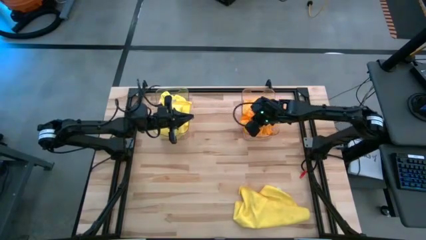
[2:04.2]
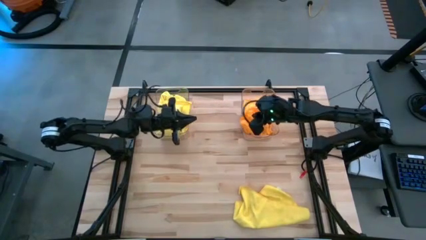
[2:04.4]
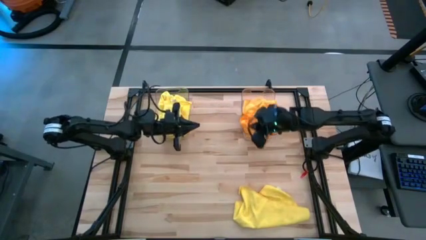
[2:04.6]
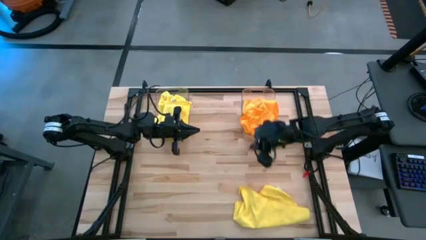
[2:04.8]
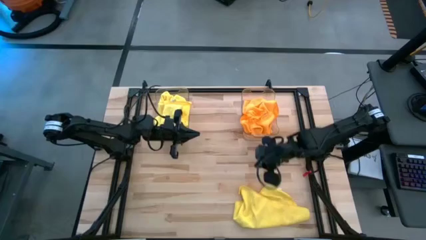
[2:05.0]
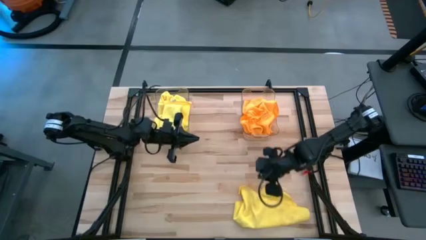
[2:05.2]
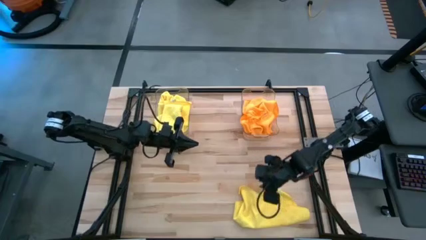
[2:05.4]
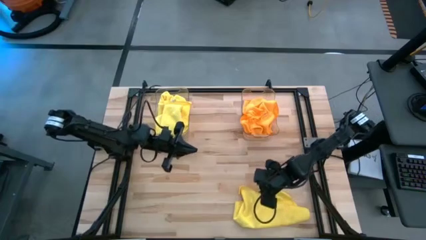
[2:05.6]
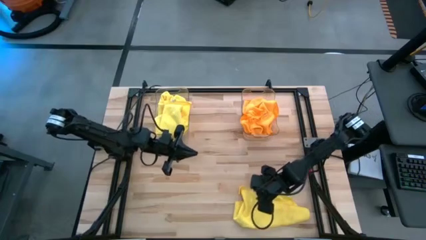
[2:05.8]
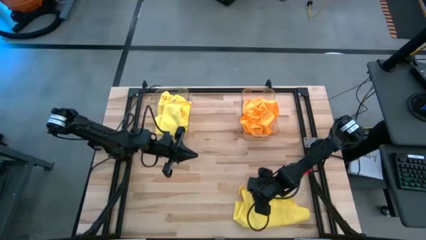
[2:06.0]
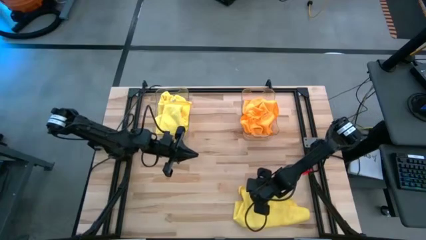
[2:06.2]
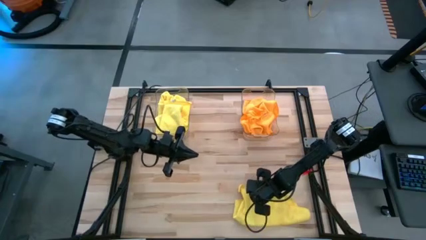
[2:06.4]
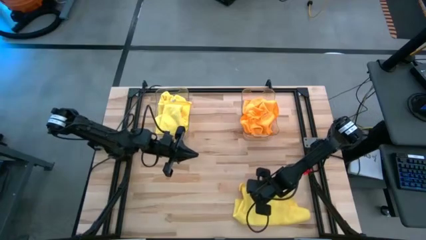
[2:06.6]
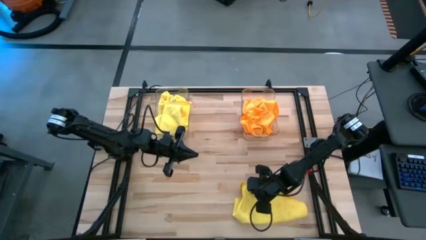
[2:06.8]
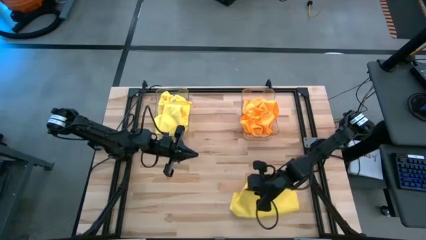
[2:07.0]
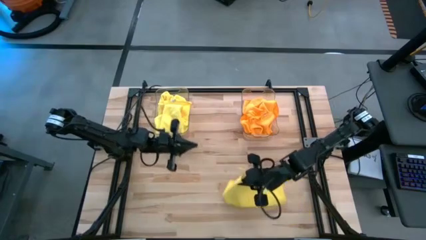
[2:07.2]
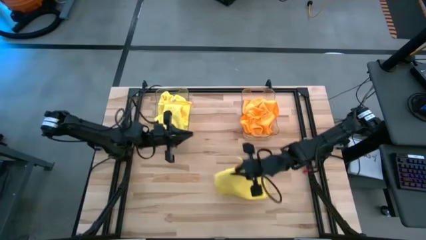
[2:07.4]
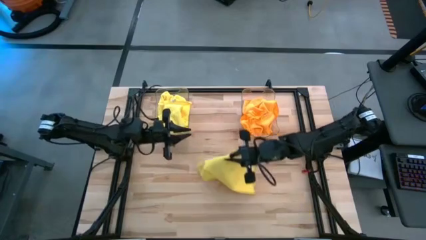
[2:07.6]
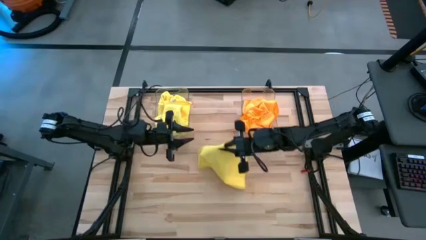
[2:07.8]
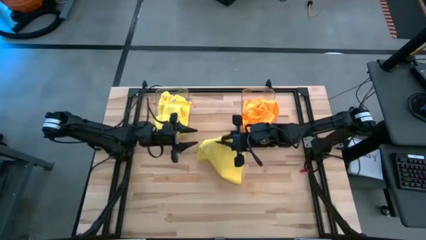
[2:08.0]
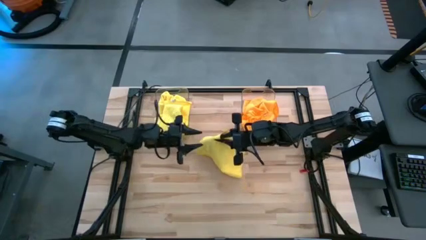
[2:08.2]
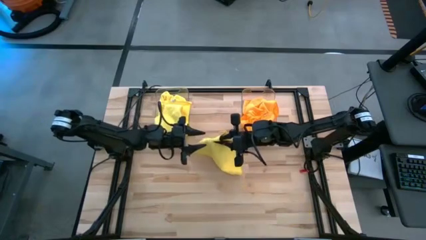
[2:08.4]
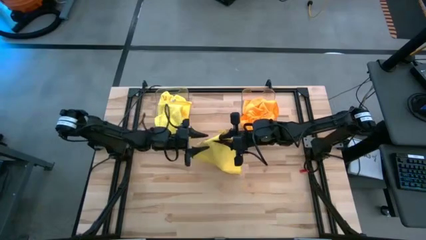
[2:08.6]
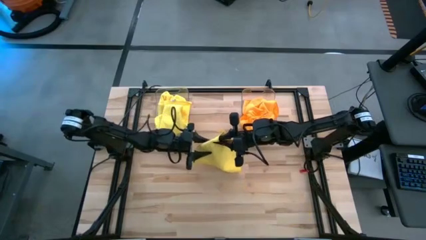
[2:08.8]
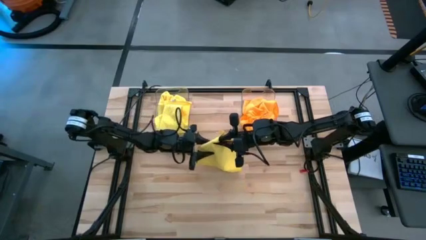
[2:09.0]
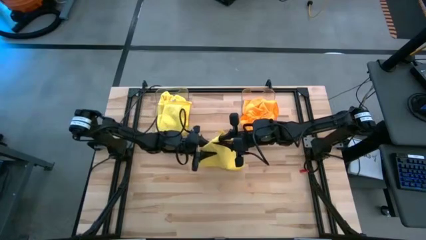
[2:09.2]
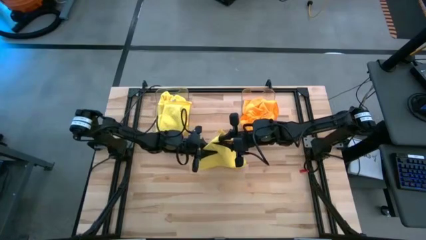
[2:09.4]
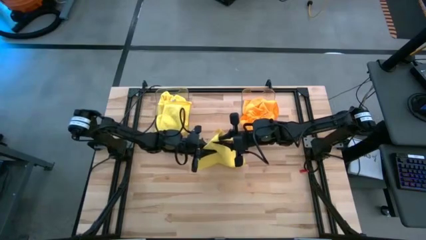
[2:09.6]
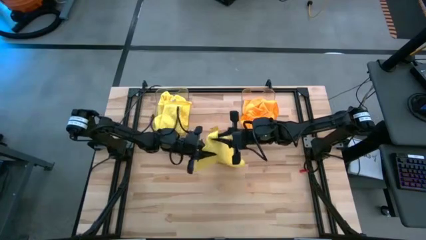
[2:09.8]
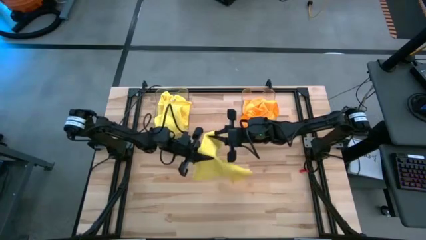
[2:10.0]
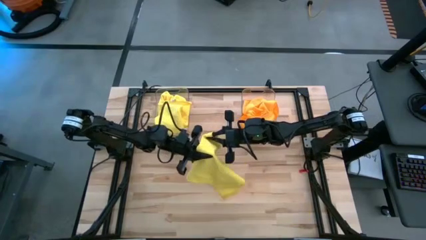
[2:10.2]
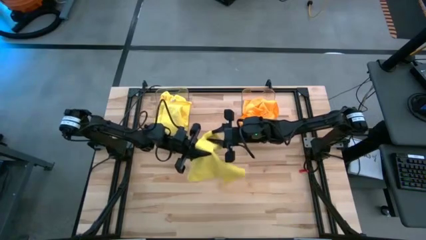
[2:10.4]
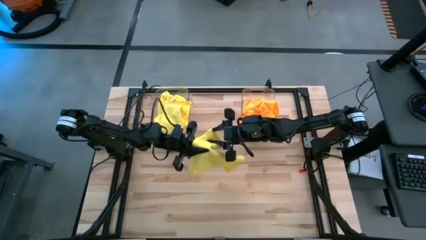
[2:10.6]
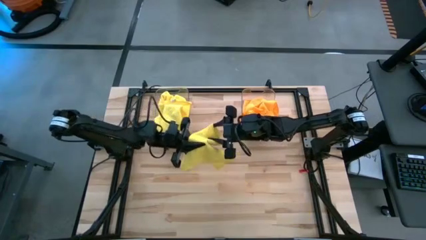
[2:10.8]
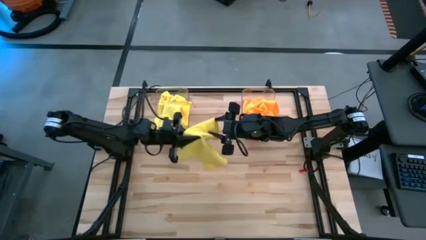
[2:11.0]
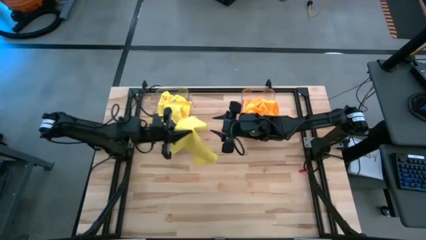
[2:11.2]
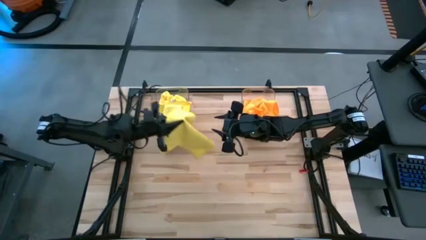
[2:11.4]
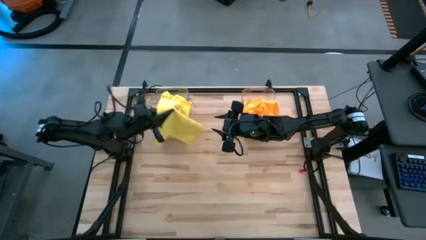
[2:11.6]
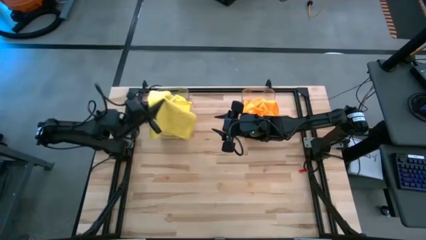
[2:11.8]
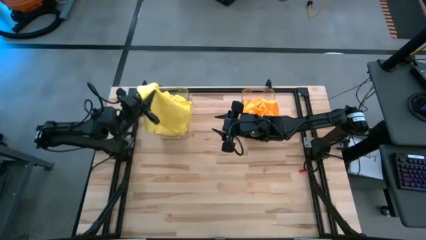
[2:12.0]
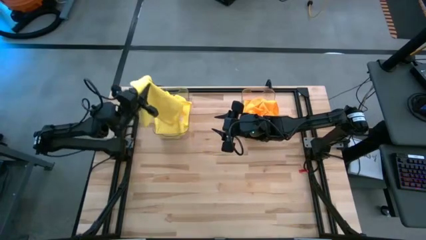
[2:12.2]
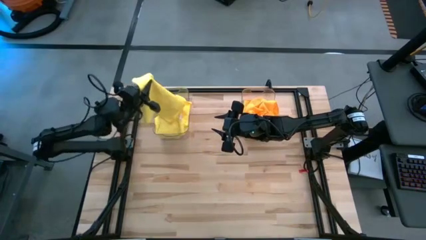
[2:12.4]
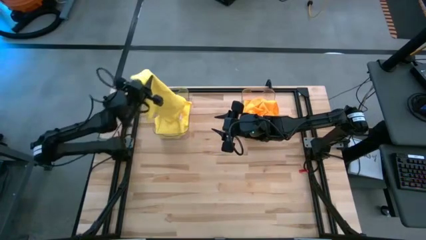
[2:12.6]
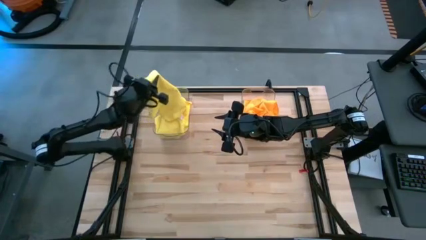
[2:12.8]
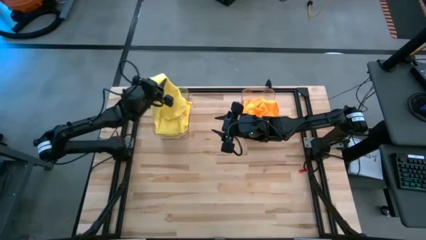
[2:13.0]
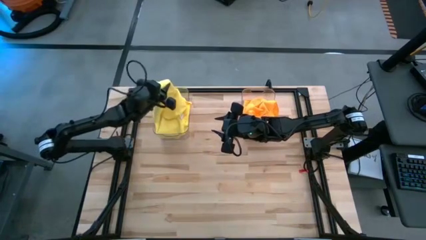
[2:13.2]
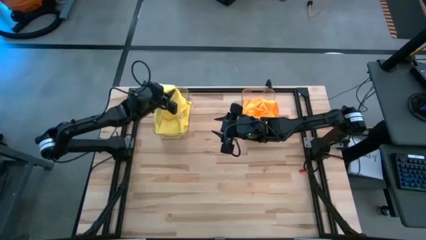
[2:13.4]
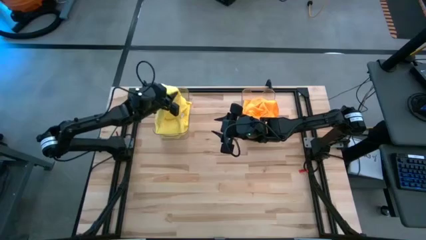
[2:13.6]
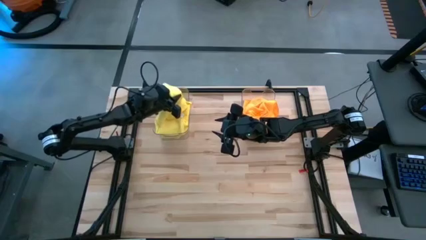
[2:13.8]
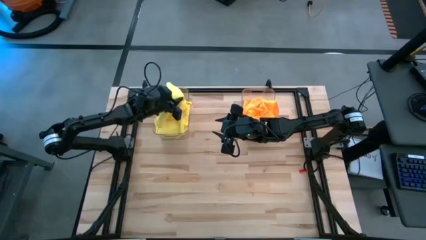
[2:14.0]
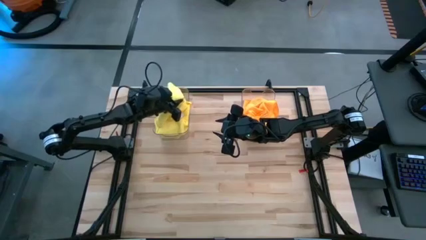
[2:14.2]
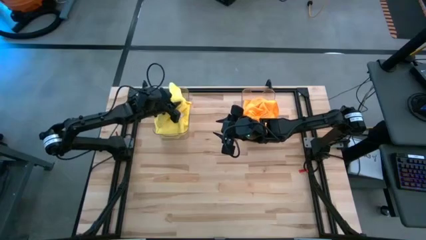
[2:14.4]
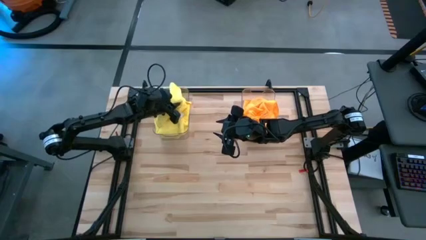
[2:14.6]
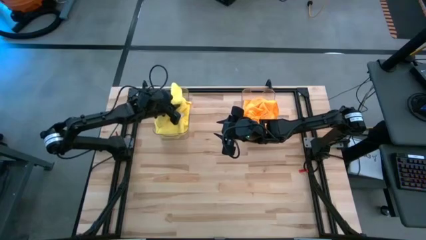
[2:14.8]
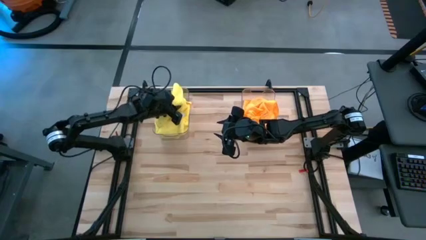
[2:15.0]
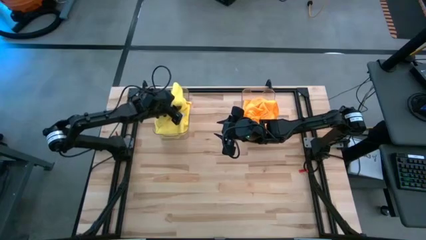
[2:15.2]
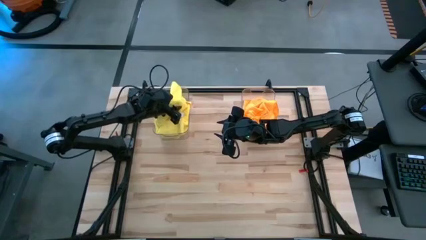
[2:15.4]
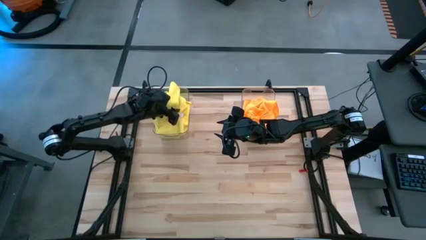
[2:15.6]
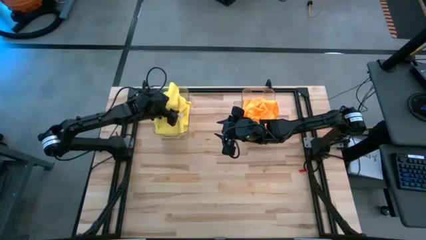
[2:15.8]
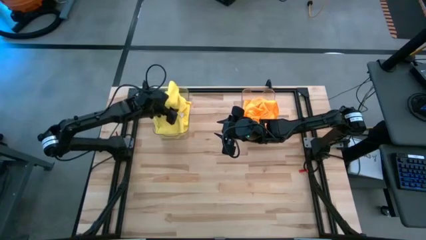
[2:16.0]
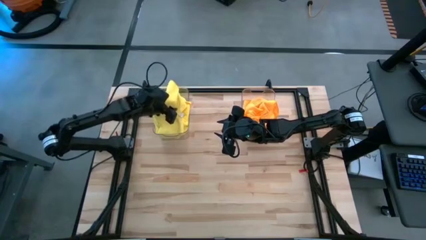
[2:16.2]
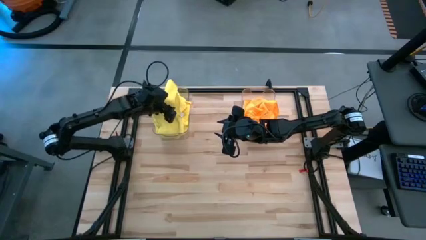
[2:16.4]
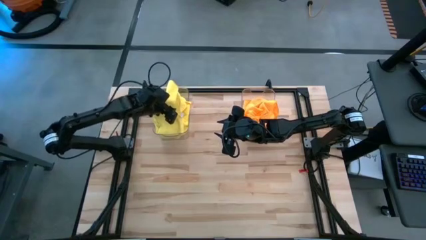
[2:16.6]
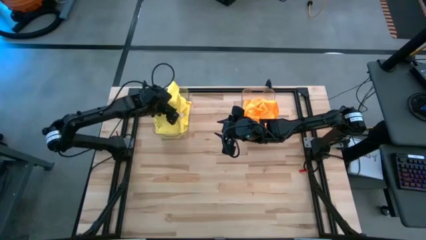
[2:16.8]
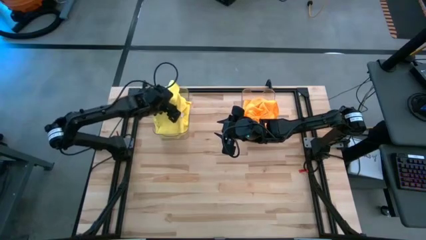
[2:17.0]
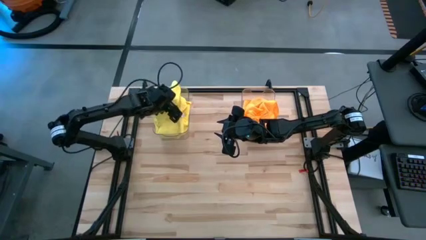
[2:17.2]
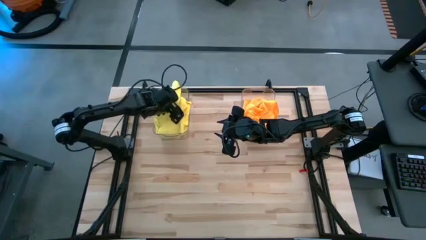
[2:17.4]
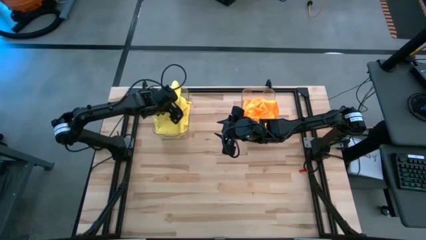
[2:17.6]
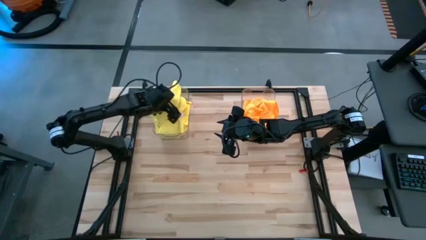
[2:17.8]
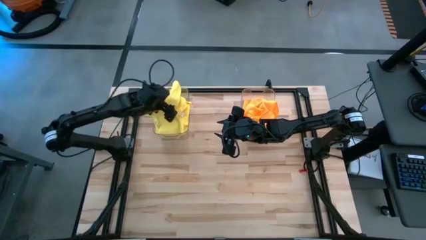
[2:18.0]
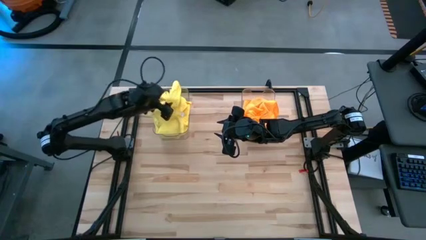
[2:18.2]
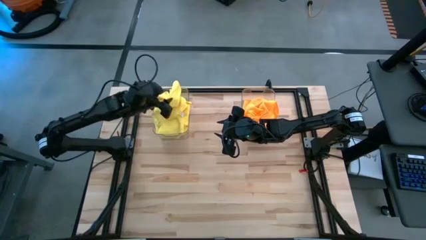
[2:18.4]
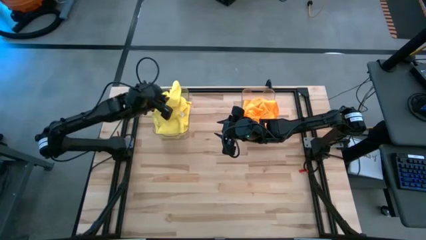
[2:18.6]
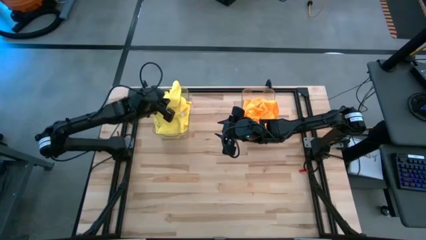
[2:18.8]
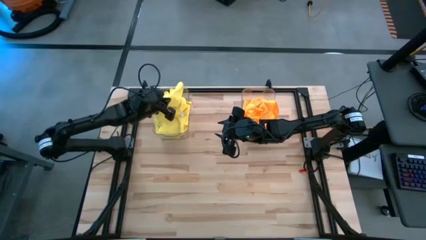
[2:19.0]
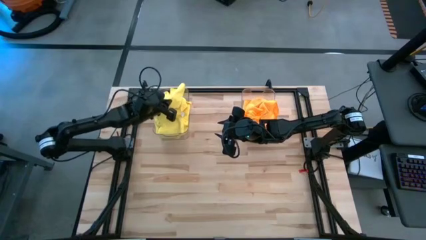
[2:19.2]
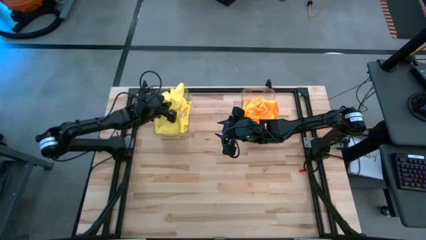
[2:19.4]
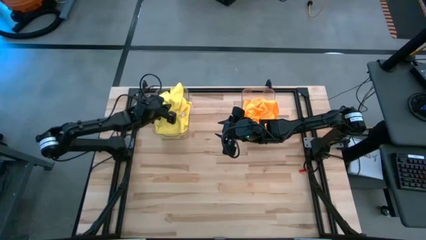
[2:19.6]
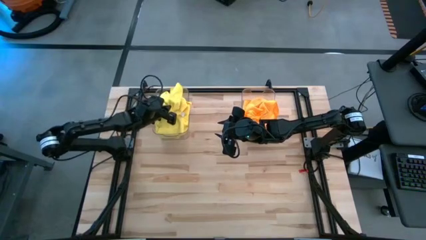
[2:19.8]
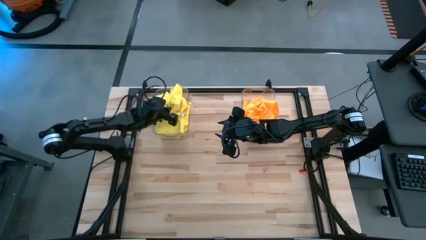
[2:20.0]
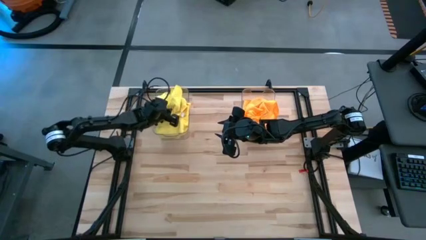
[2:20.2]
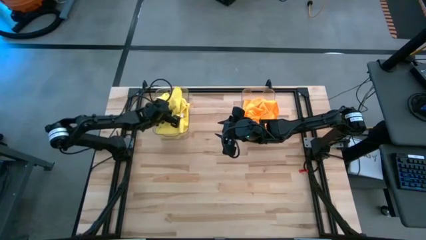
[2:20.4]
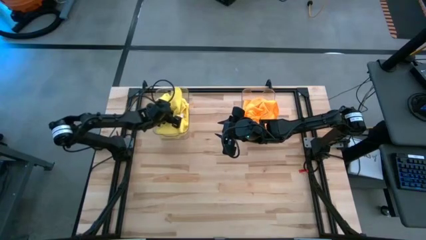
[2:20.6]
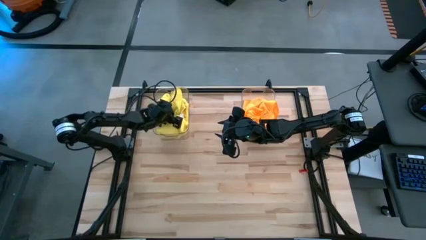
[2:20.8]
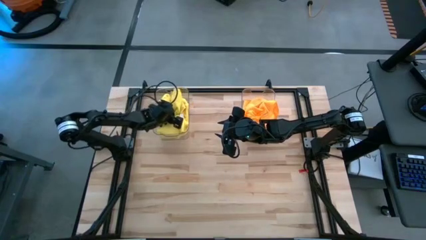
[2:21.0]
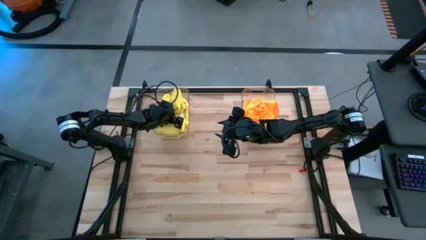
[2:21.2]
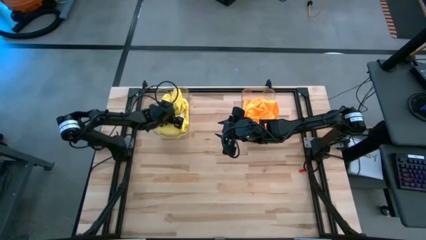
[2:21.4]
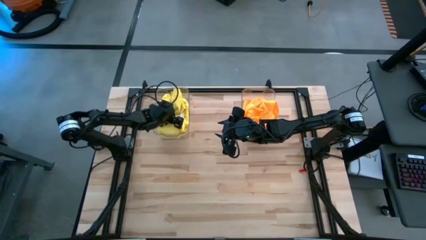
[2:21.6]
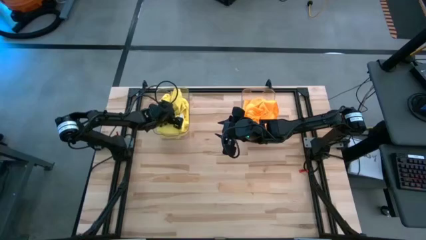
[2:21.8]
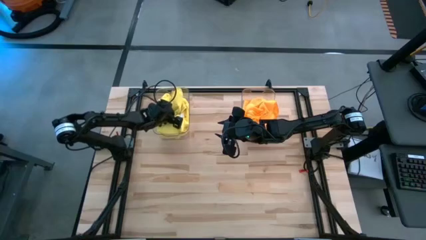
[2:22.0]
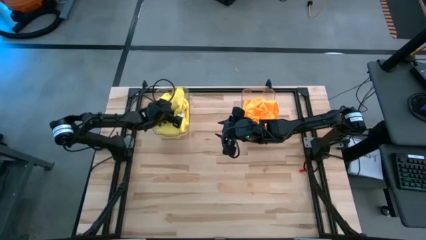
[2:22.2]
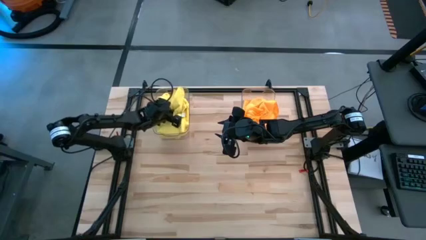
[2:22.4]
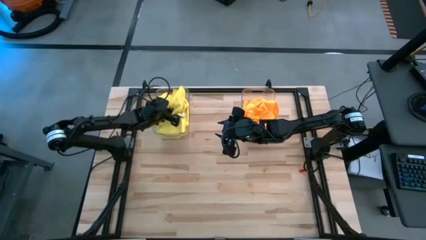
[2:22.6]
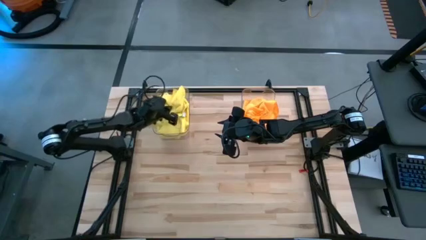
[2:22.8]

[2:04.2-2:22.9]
Task: Sort microfiber towel by color & place in baskets
Put the yellow microfiber cloth into the left transparent bin
